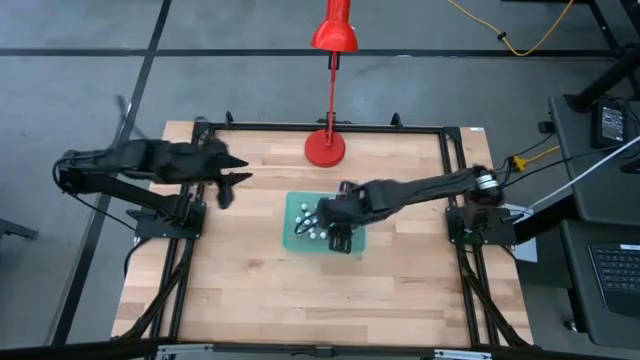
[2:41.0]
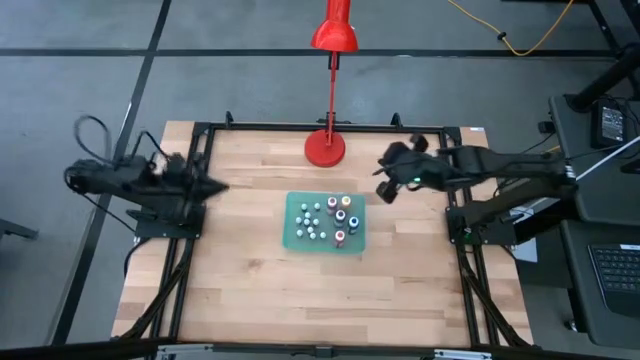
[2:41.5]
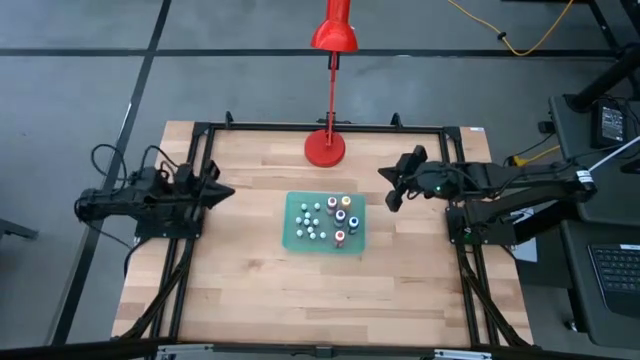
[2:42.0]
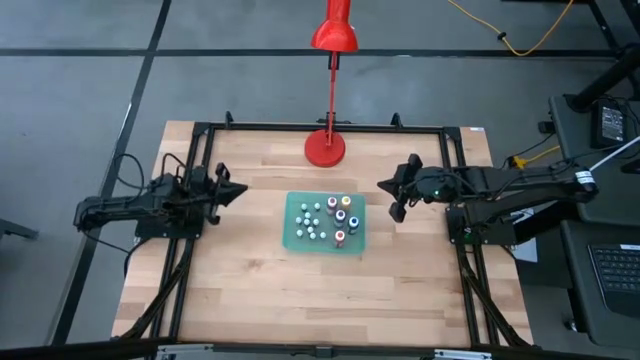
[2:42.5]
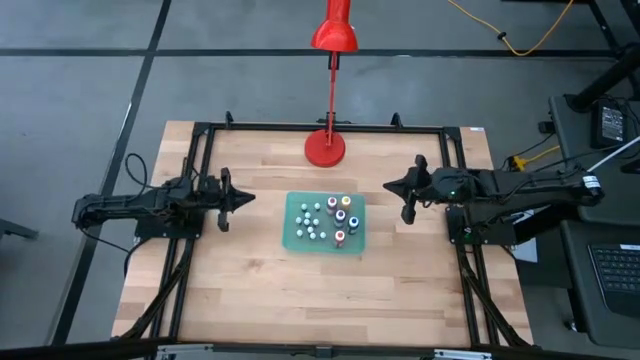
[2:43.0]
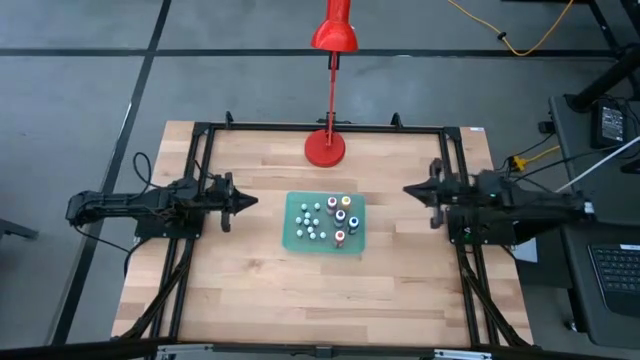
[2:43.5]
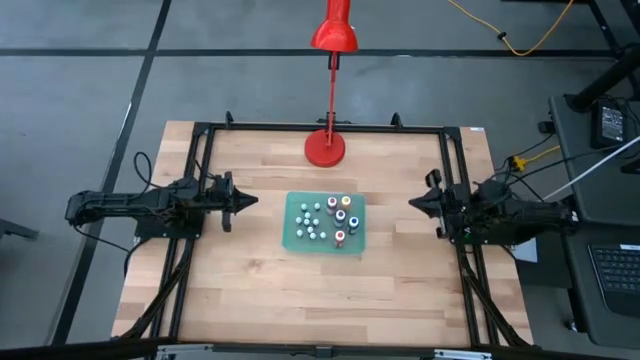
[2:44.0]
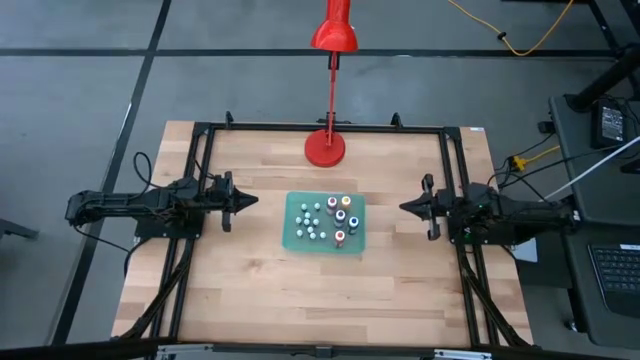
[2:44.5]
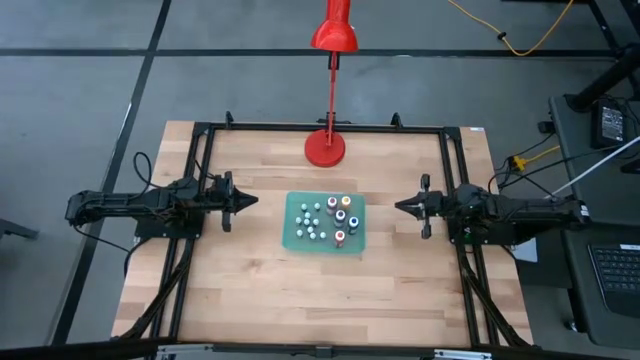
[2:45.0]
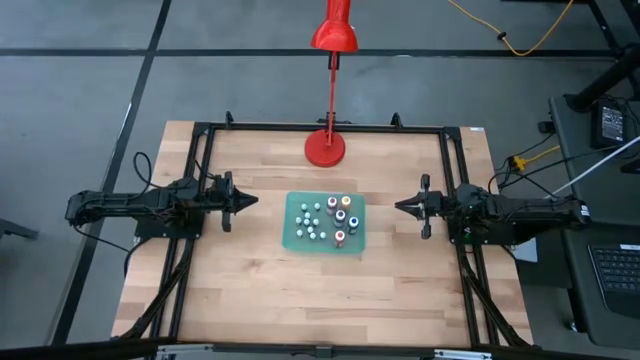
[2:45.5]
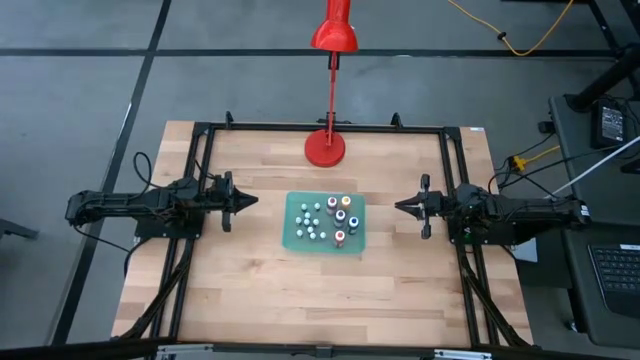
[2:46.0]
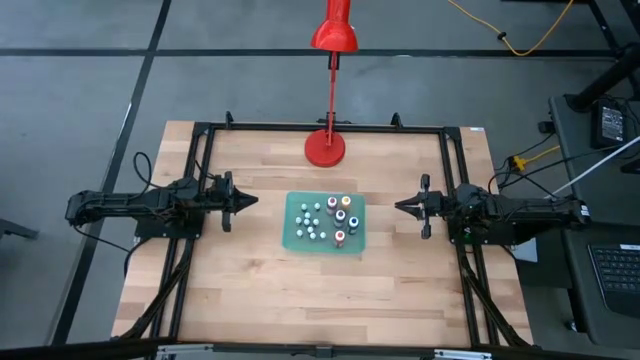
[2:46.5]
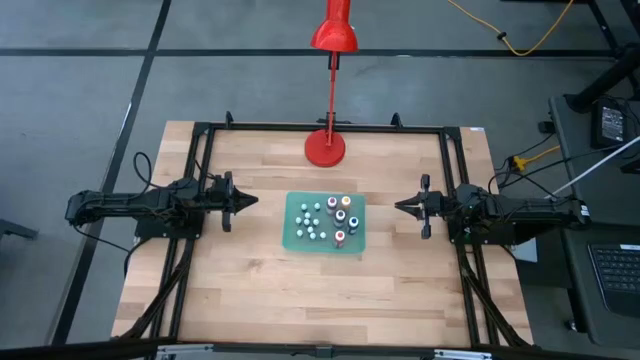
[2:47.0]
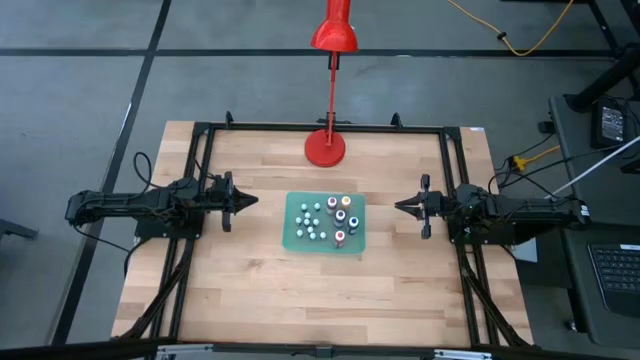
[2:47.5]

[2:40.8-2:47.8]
Task: Pick & Place food coloring
Return to Home Position

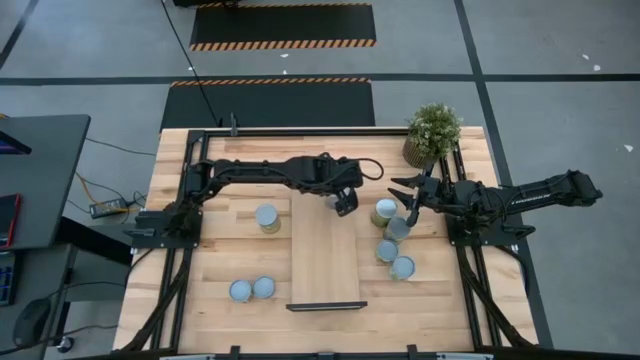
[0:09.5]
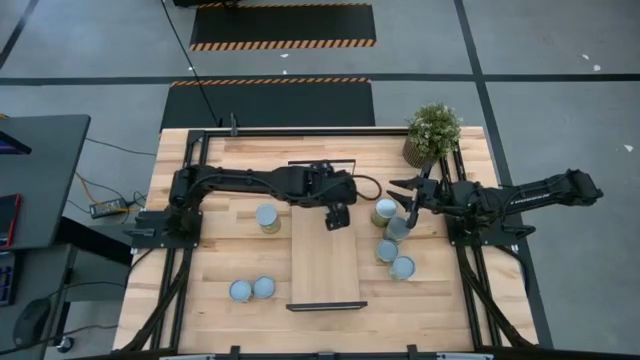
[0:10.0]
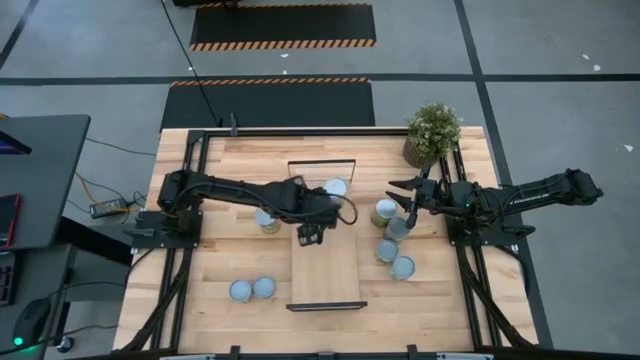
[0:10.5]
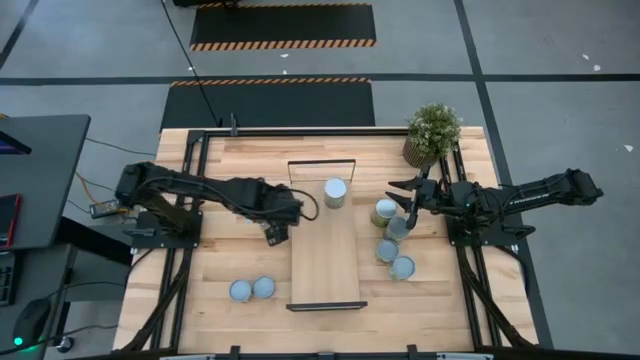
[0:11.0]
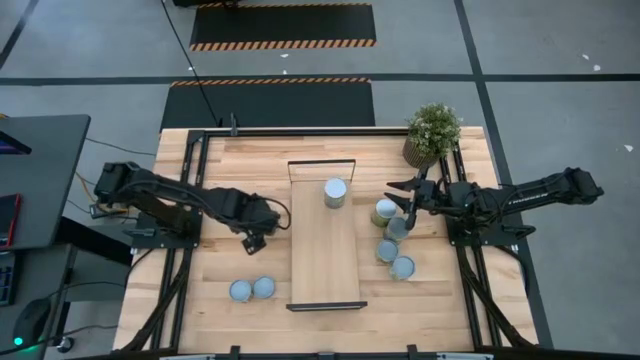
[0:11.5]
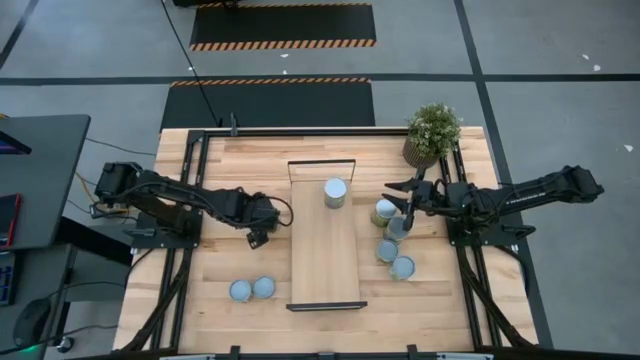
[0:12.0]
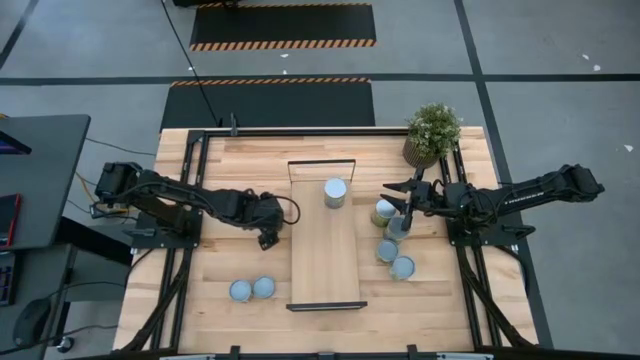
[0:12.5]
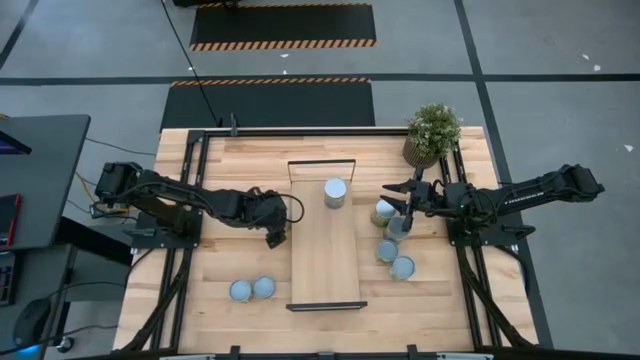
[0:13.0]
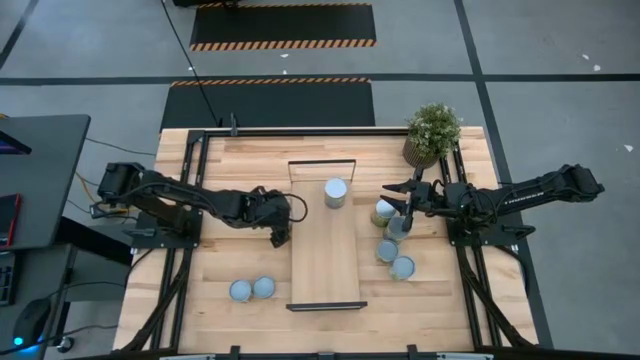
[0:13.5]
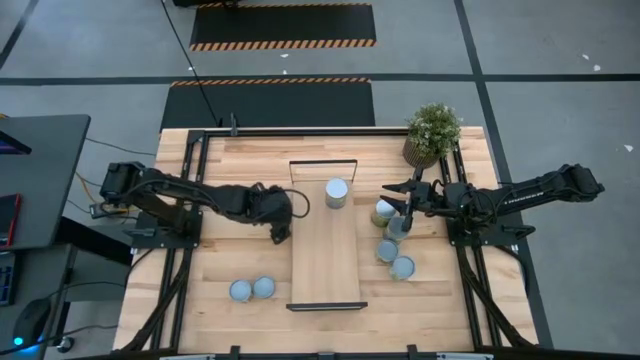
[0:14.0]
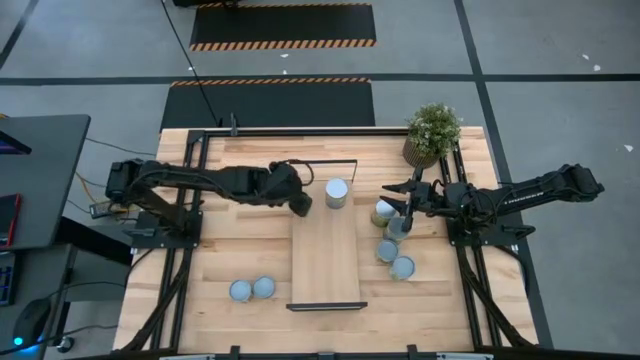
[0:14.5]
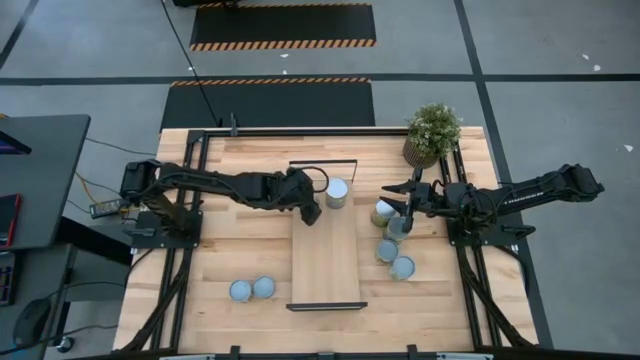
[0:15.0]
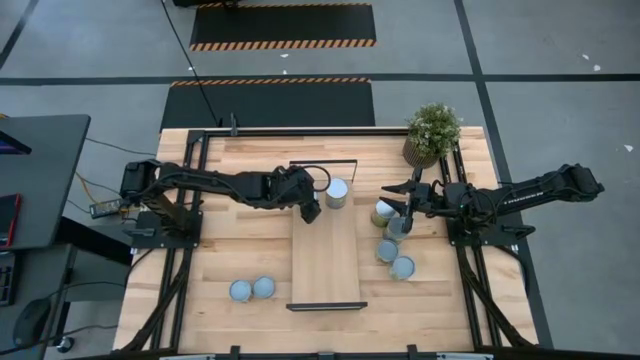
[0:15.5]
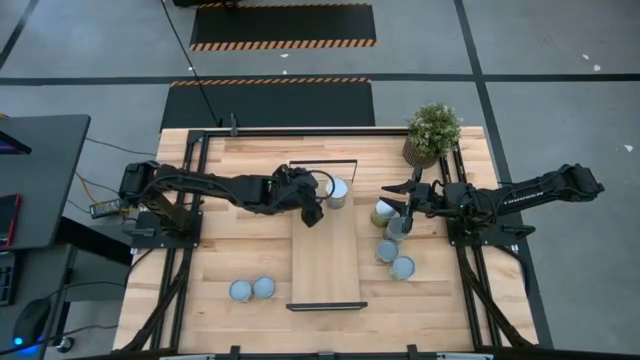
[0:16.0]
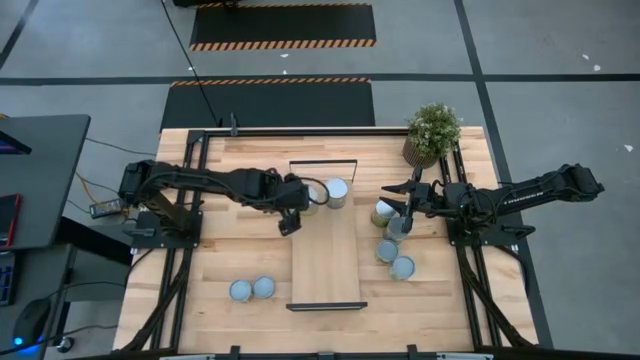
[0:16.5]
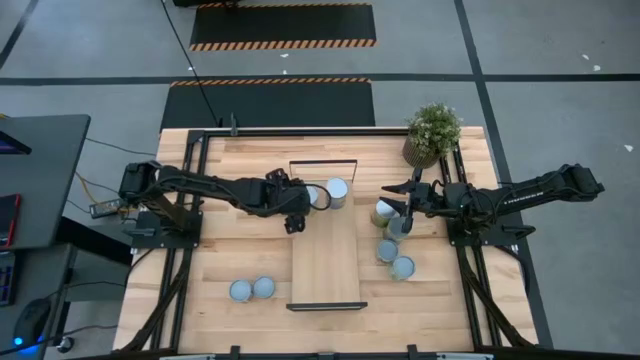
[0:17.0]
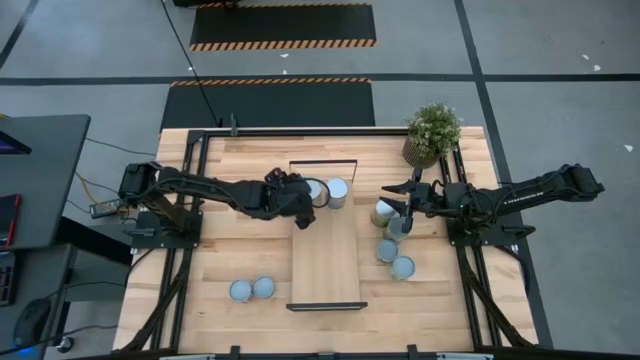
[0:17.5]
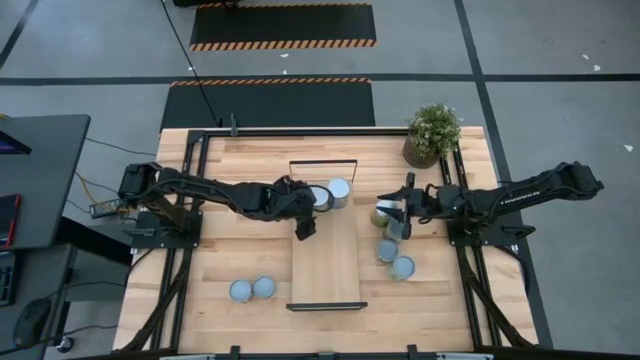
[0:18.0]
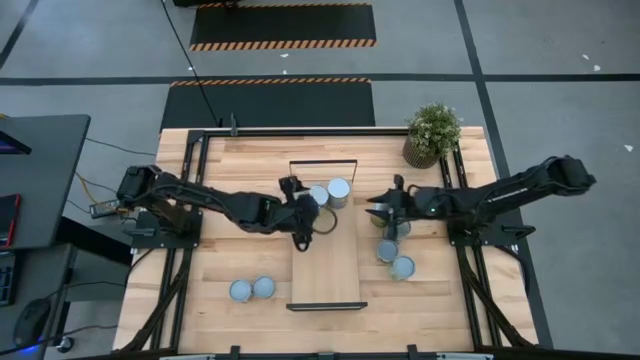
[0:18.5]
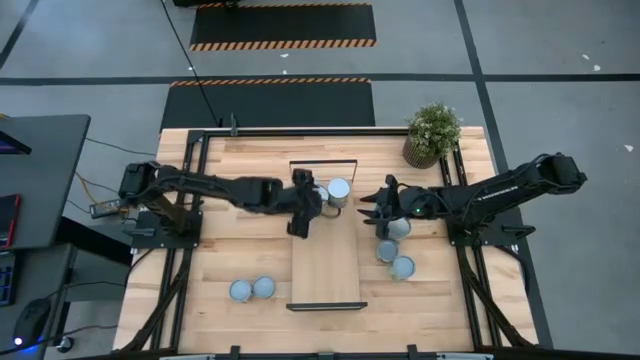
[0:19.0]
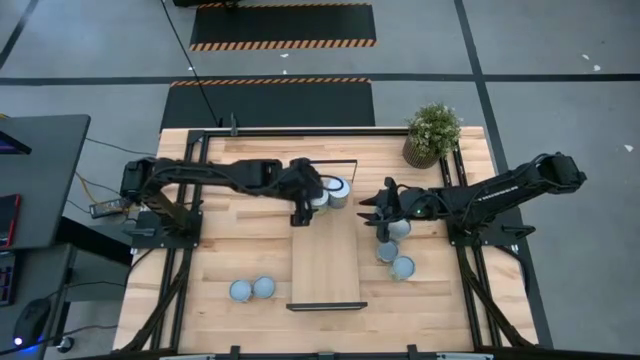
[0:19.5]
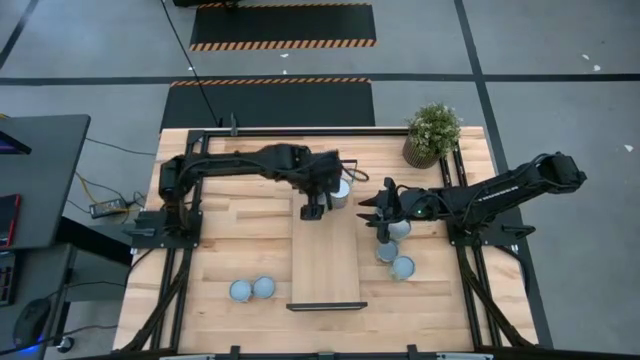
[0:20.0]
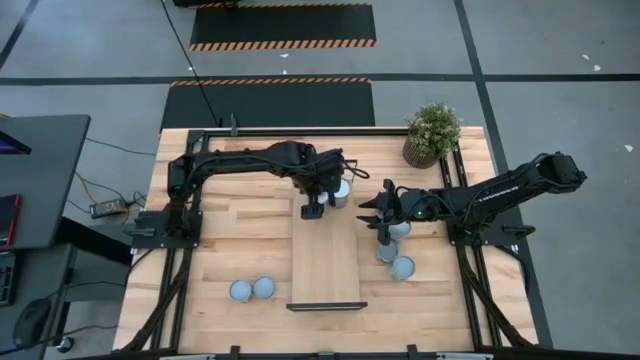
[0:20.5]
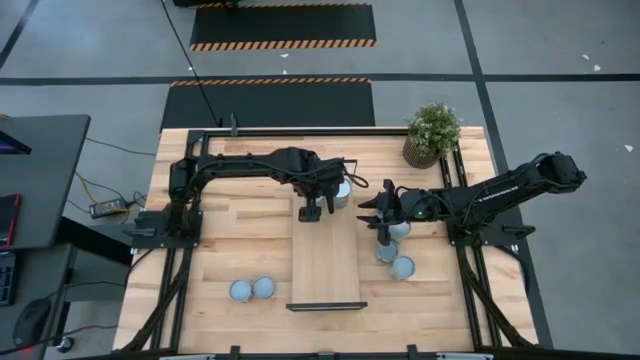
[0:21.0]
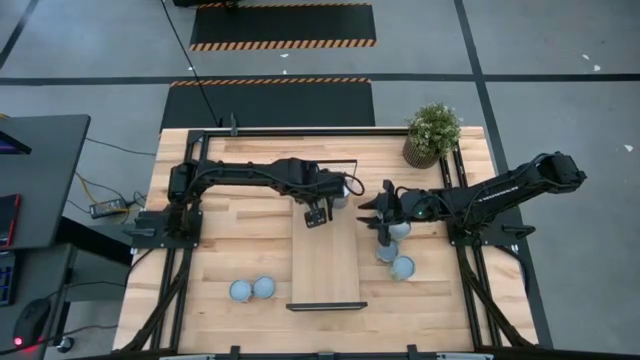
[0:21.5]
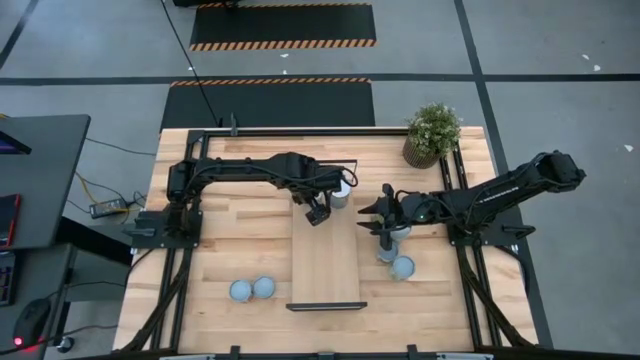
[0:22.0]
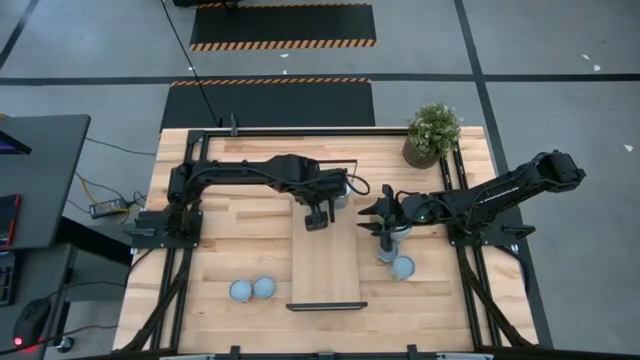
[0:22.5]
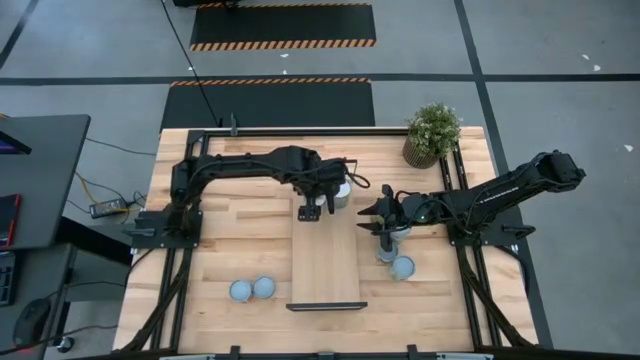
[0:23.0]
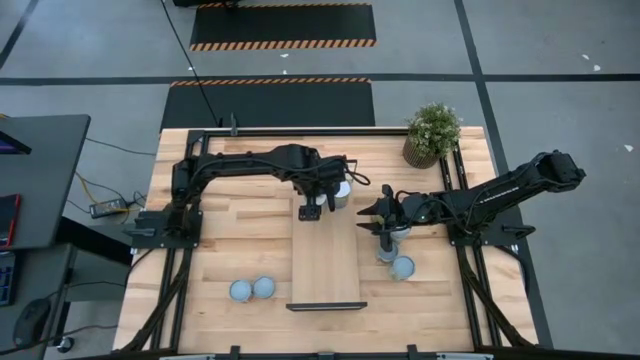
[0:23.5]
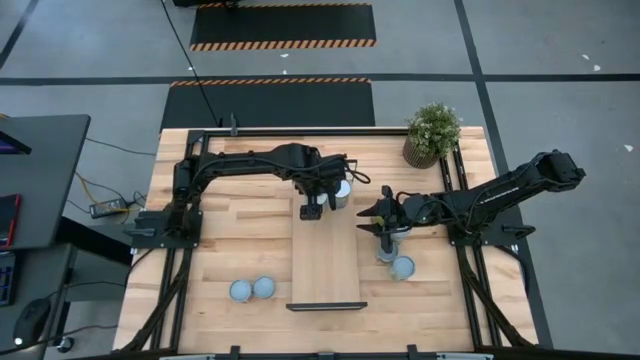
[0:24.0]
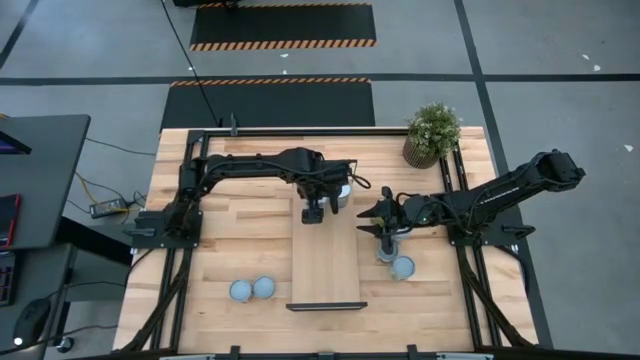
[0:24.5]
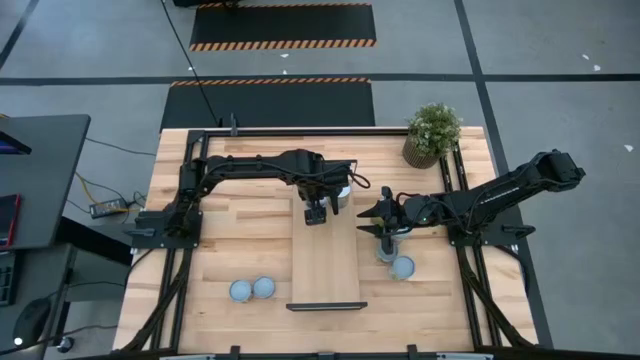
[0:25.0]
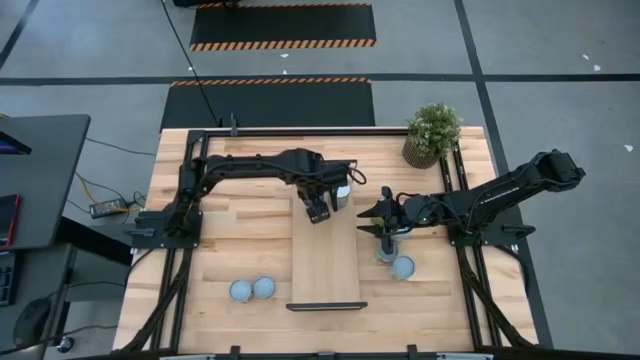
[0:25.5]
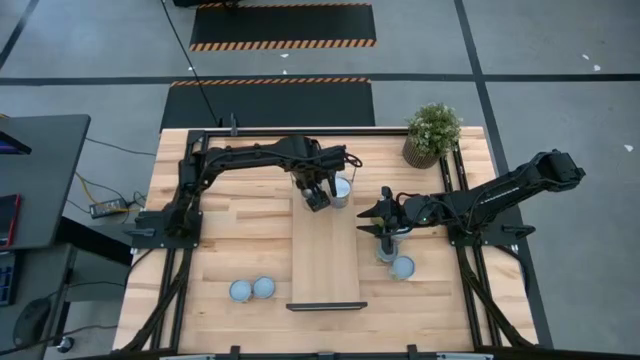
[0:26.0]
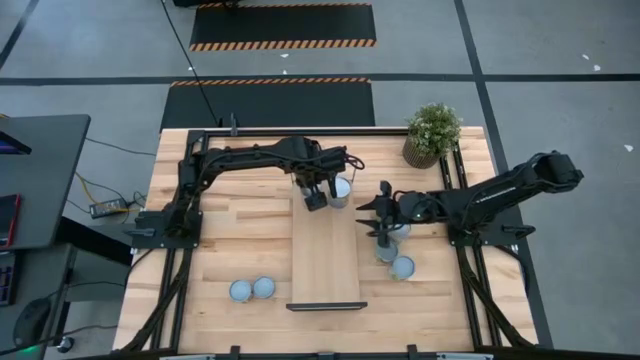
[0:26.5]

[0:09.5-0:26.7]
Task: Pick and place cans onto a shelf
Put the canned carrots on the shelf
